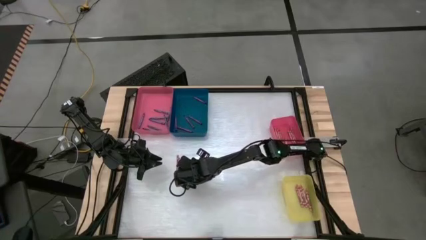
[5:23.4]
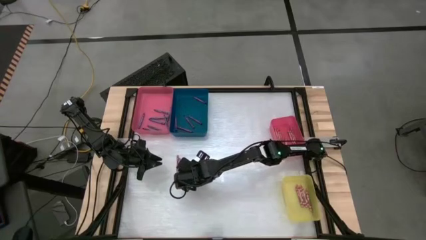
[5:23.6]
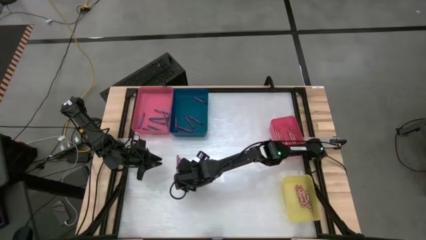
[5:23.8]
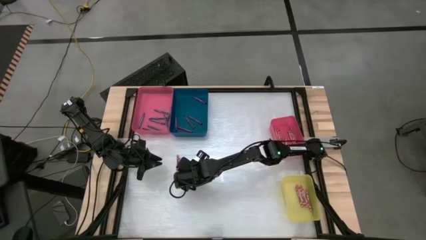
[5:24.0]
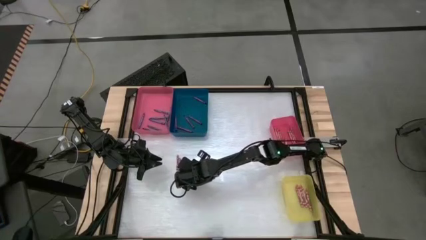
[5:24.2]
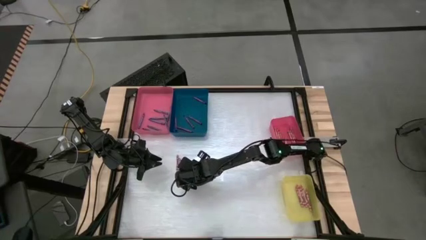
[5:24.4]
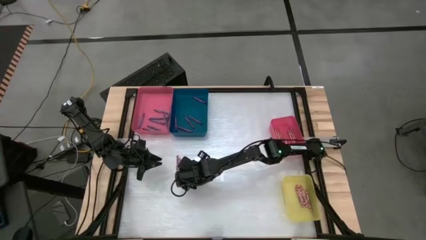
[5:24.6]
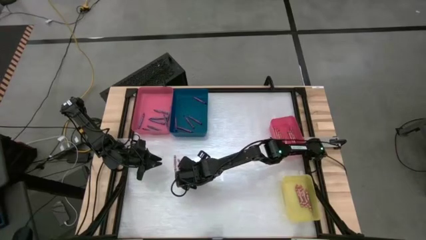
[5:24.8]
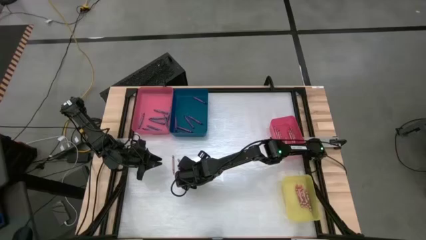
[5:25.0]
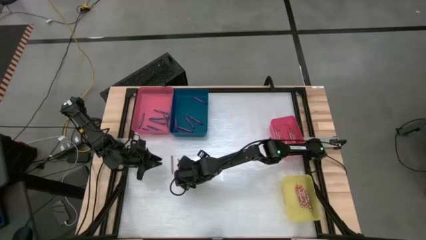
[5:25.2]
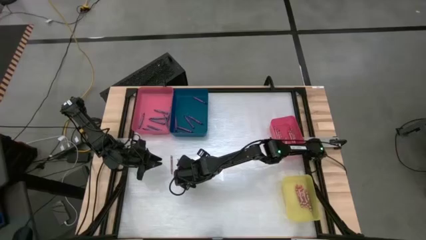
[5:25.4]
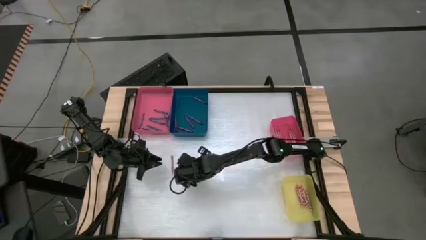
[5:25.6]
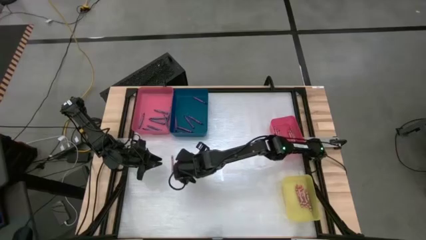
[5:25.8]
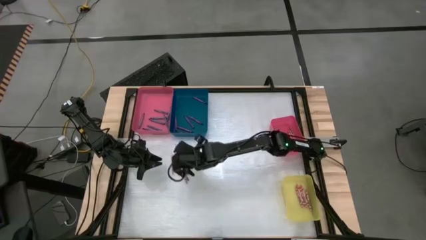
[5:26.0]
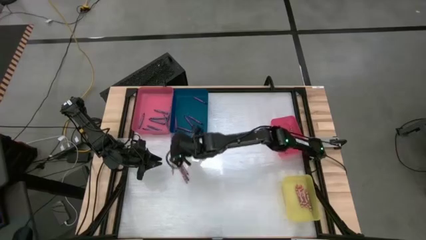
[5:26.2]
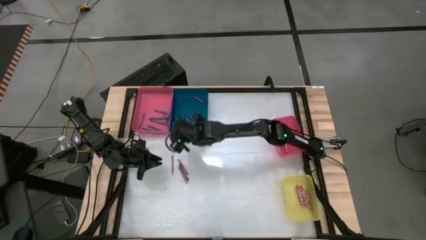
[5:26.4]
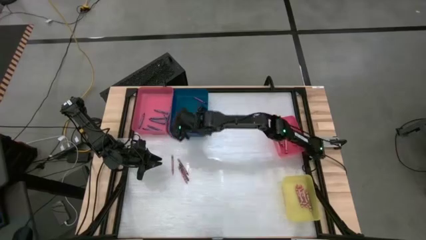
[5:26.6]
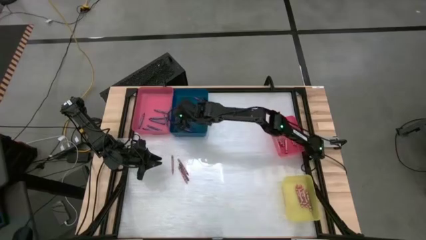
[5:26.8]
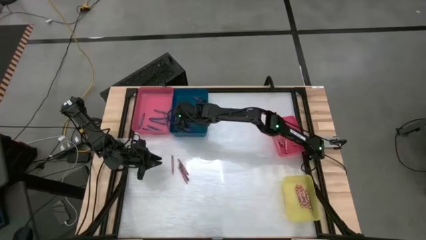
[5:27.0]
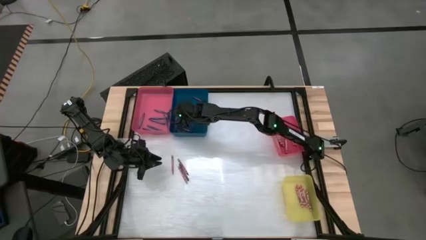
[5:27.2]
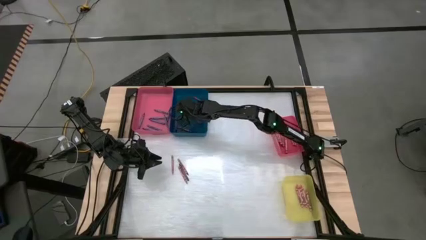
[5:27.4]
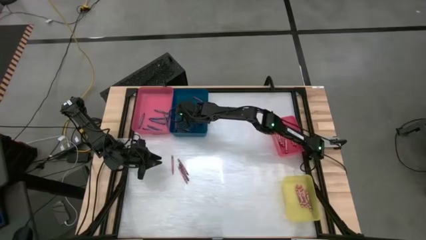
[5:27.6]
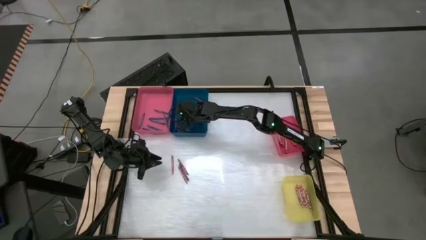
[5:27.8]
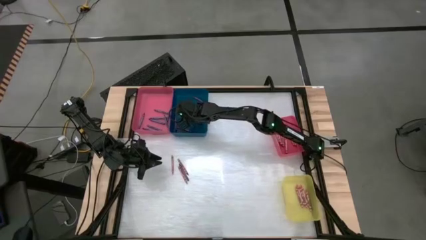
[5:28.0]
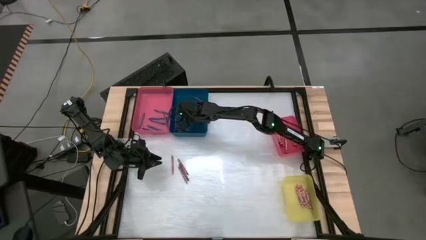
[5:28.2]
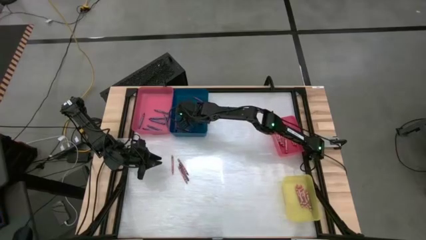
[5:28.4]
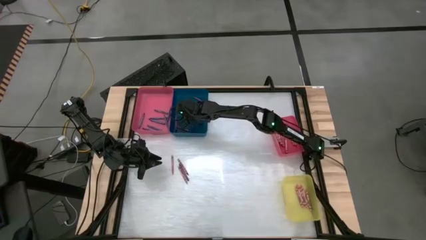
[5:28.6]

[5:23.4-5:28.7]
Task: Sort crayons
Put the purple crayon into the blue bin

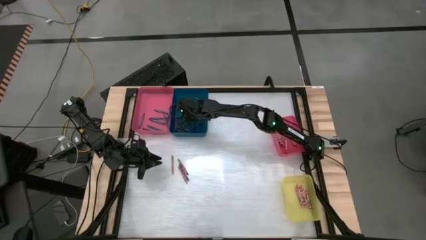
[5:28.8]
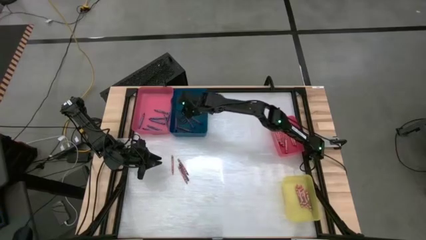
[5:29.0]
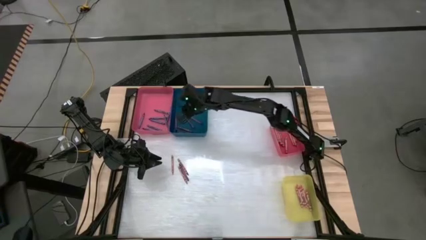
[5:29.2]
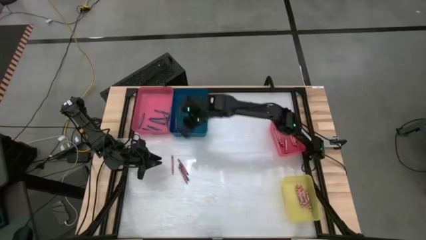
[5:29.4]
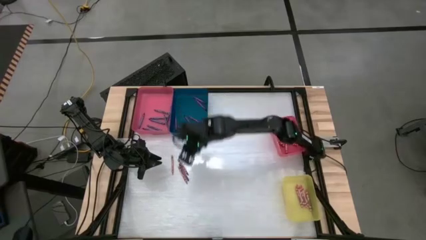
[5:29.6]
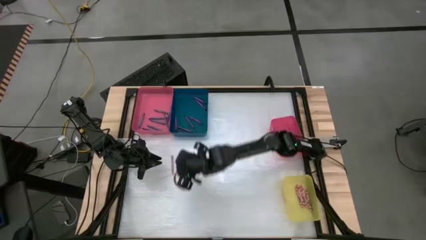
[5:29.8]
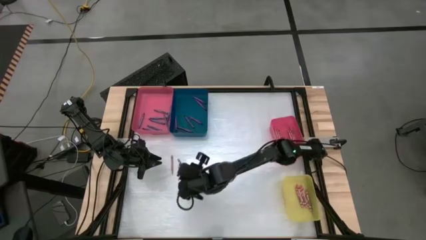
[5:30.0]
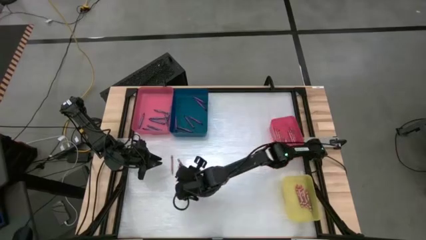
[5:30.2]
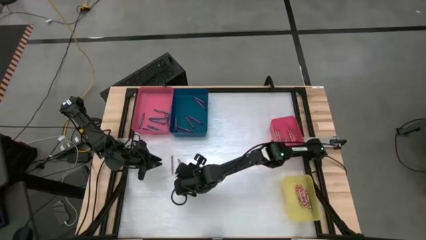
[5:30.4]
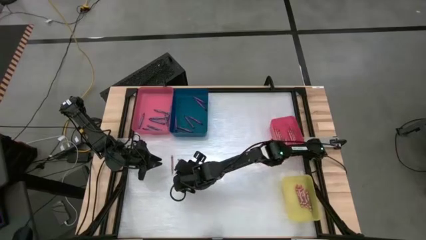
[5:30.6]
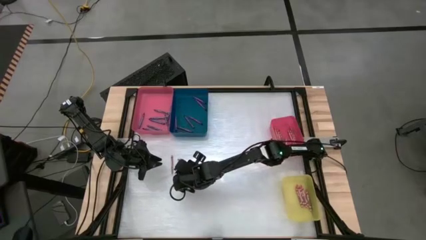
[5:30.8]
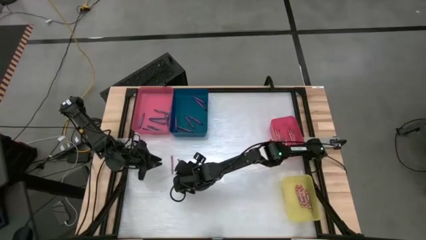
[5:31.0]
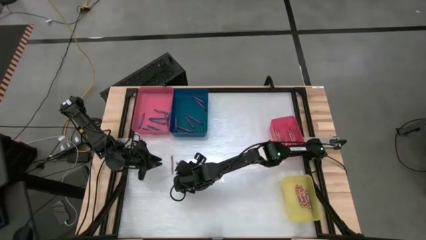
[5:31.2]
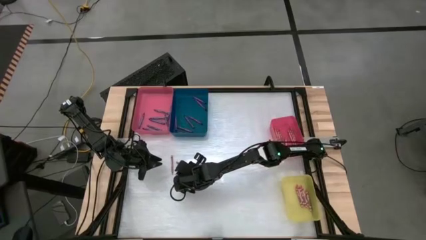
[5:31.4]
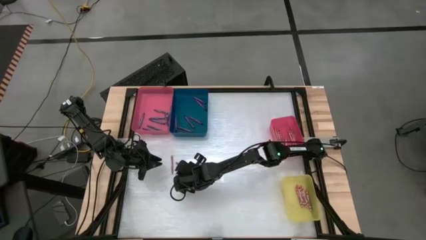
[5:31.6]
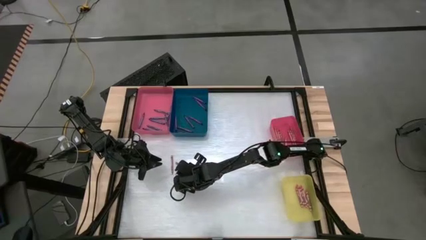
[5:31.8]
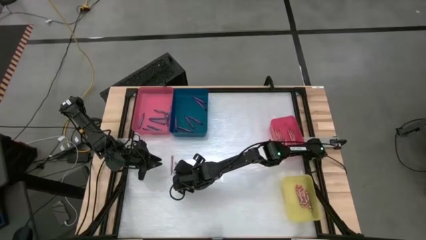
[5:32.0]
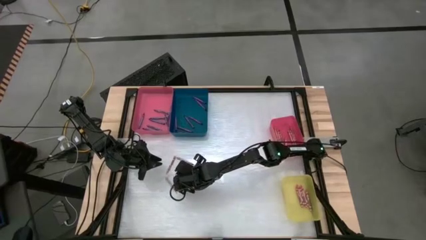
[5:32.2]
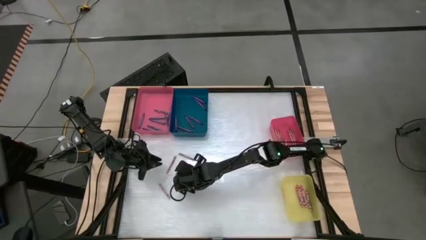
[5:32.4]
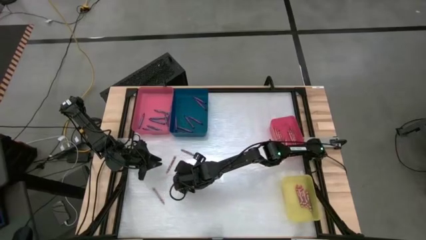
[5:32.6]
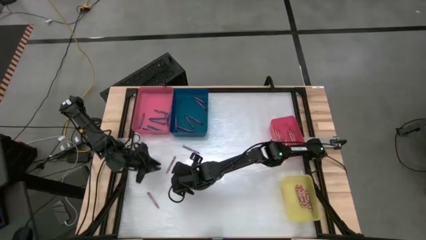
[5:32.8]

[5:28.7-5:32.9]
Put the pink crayon into the yellow bin
